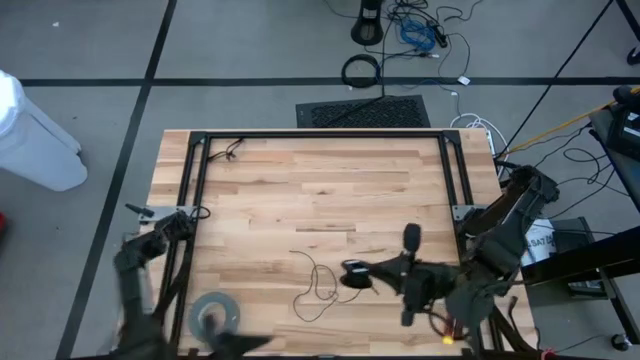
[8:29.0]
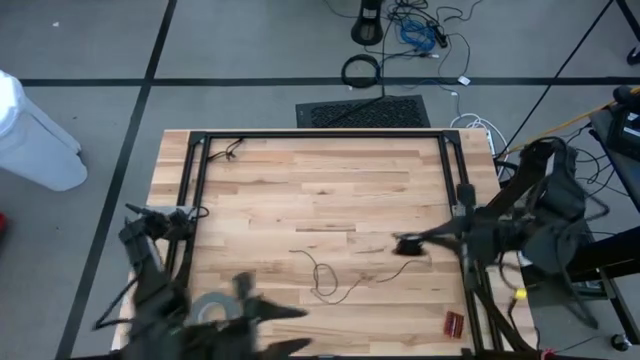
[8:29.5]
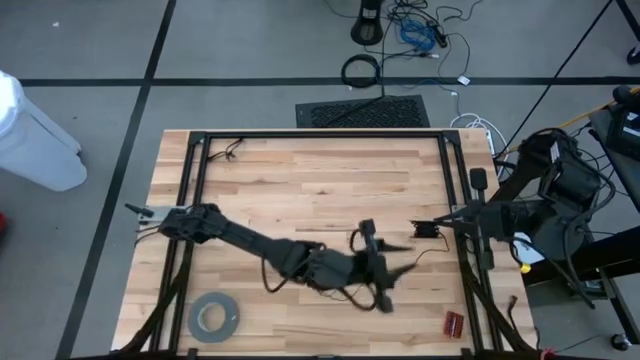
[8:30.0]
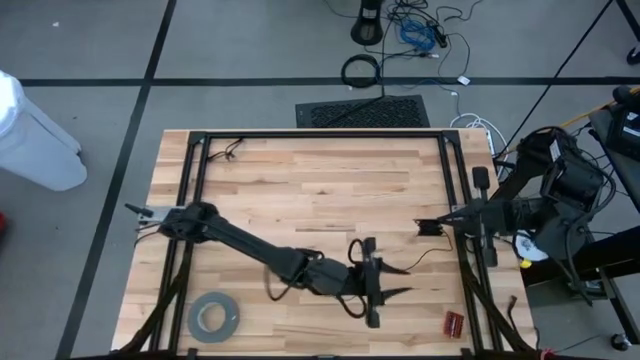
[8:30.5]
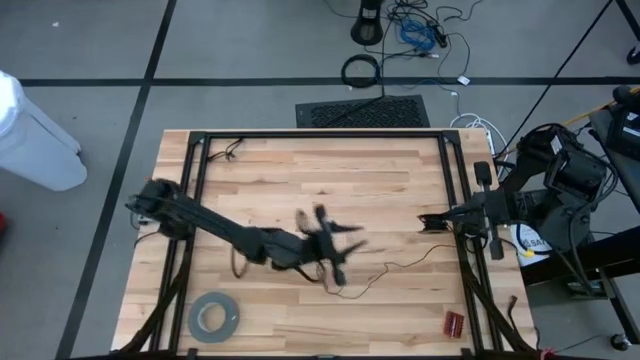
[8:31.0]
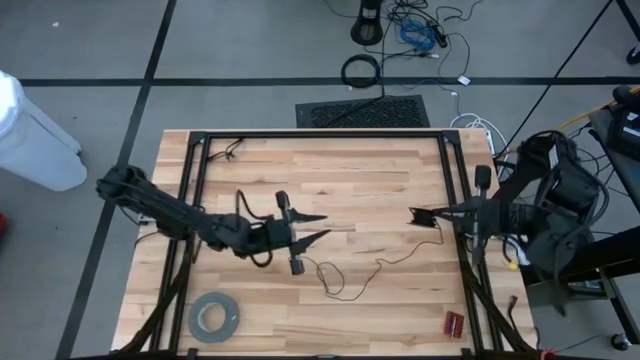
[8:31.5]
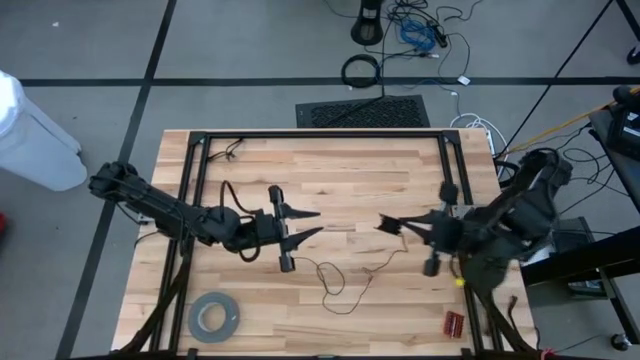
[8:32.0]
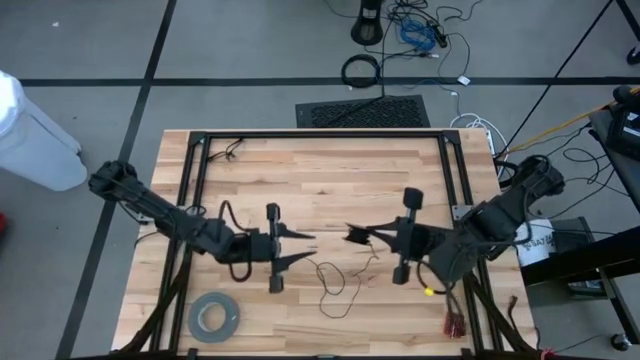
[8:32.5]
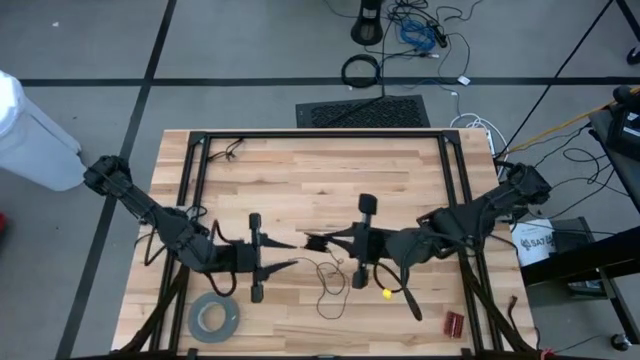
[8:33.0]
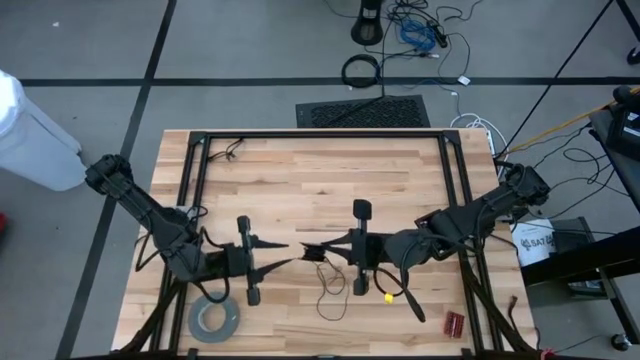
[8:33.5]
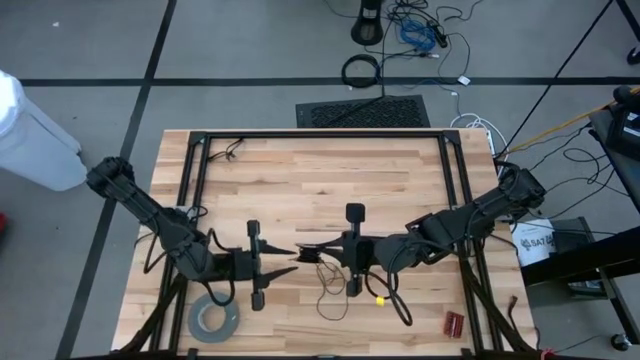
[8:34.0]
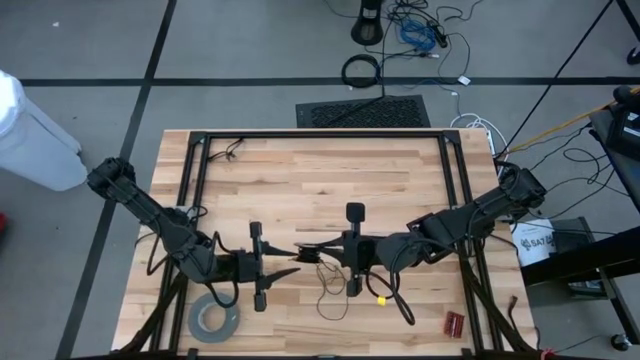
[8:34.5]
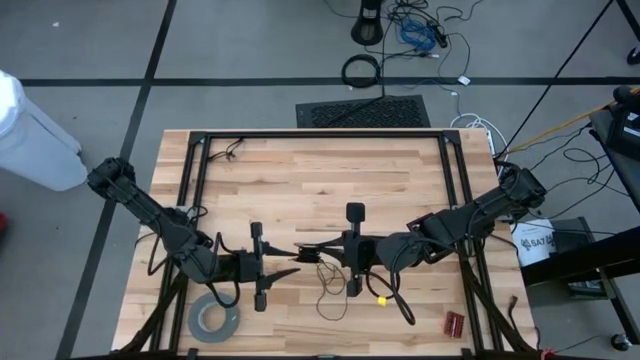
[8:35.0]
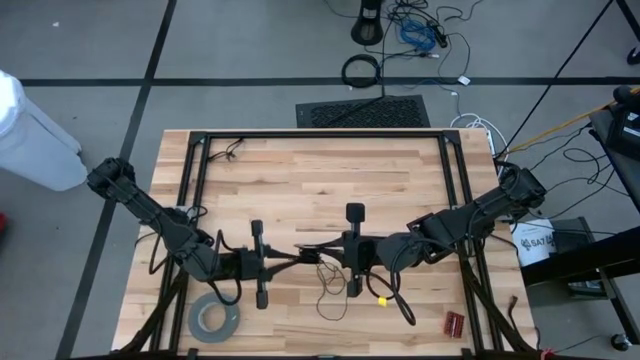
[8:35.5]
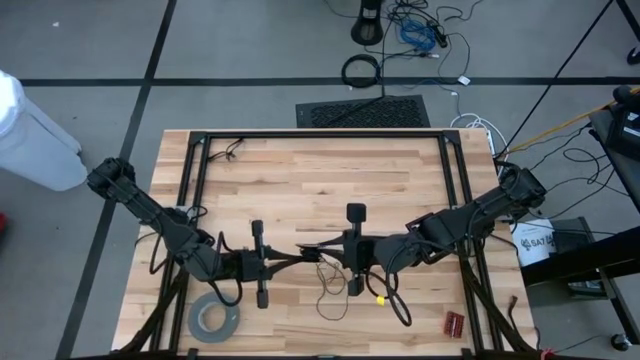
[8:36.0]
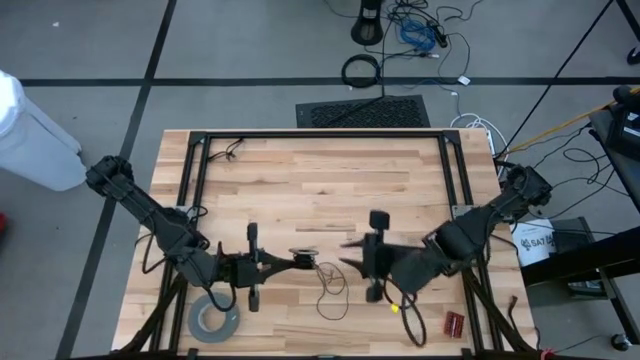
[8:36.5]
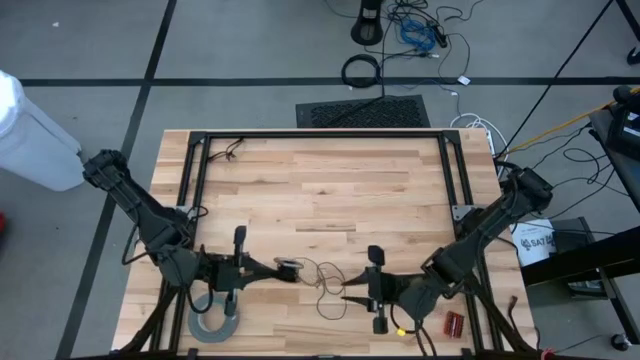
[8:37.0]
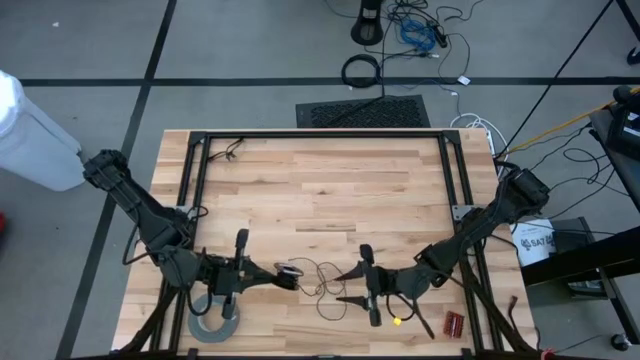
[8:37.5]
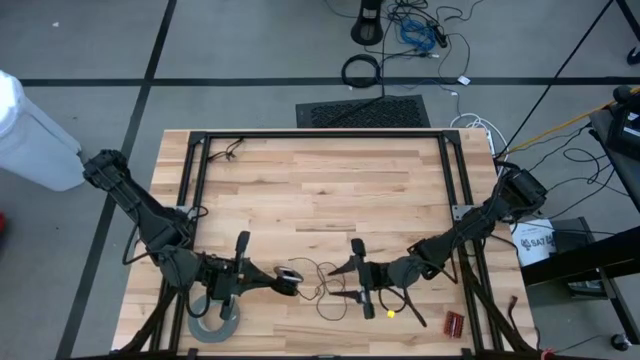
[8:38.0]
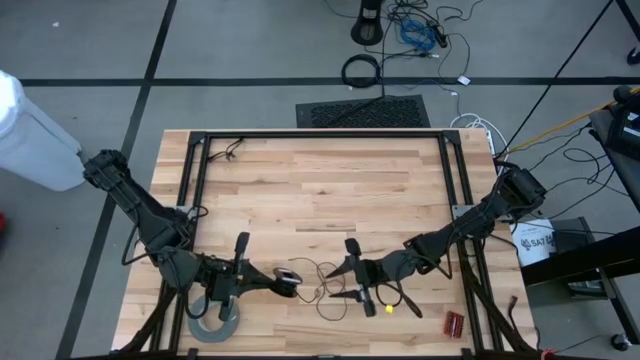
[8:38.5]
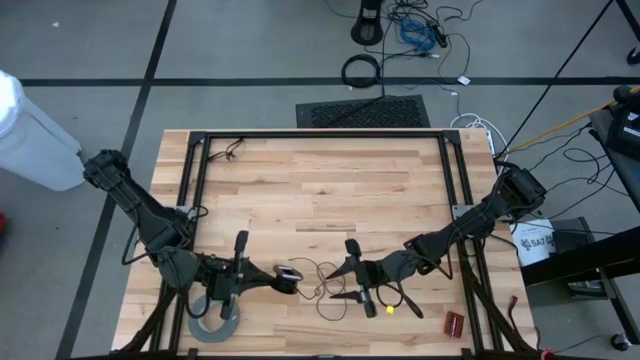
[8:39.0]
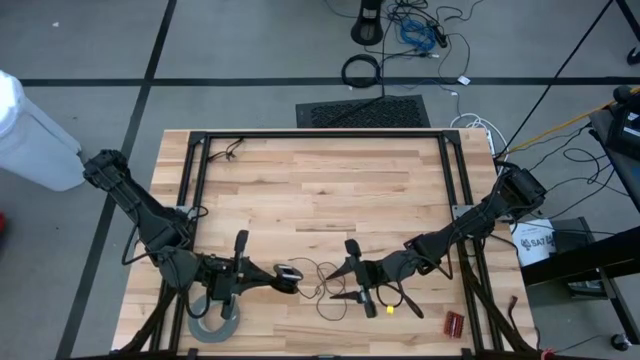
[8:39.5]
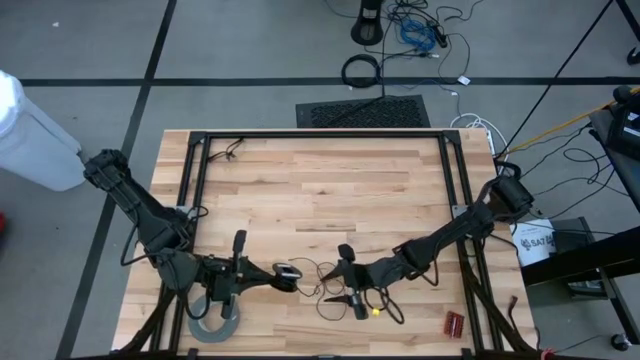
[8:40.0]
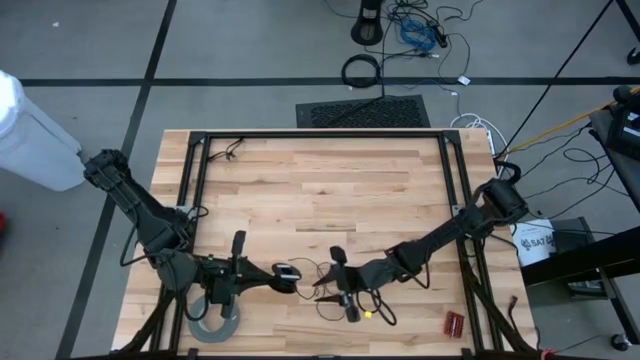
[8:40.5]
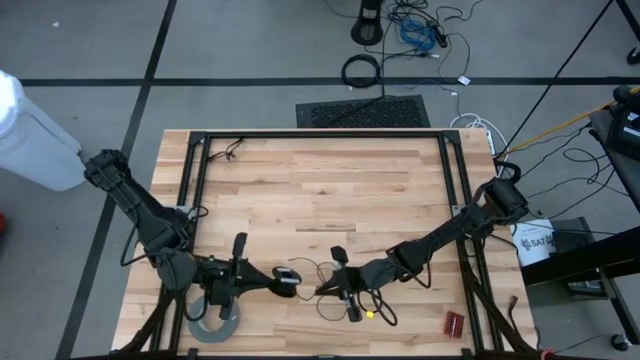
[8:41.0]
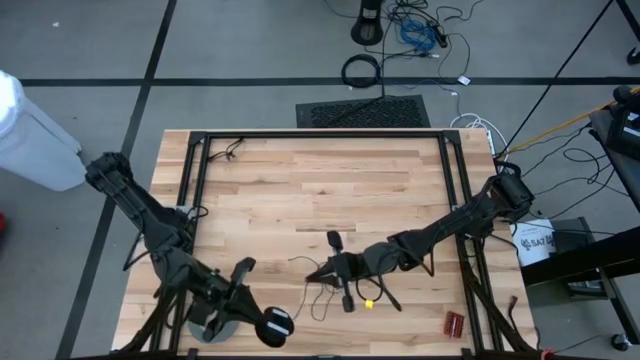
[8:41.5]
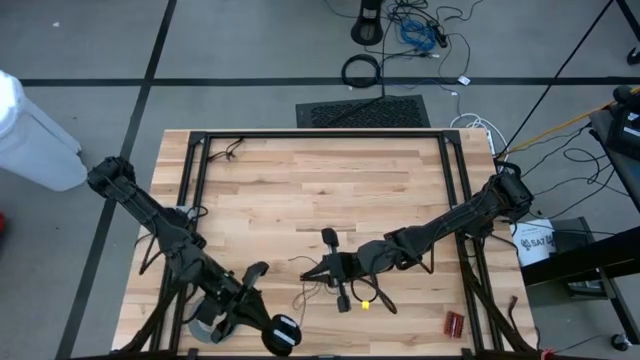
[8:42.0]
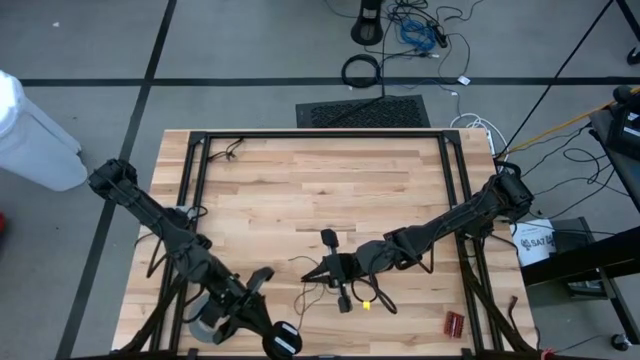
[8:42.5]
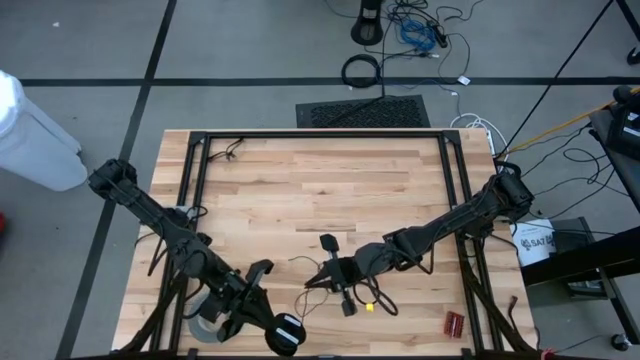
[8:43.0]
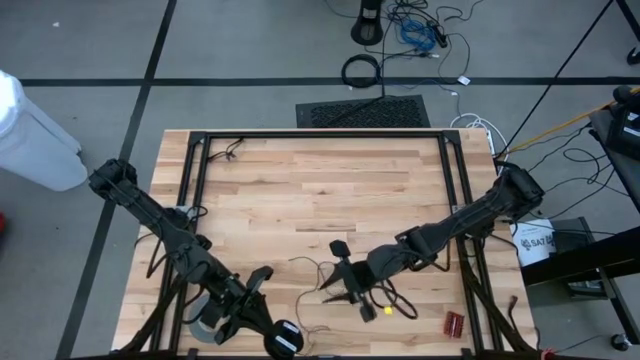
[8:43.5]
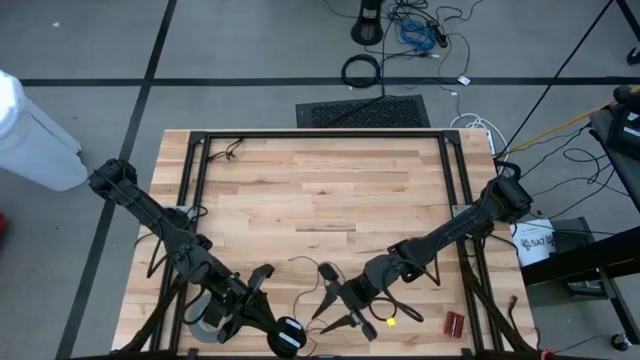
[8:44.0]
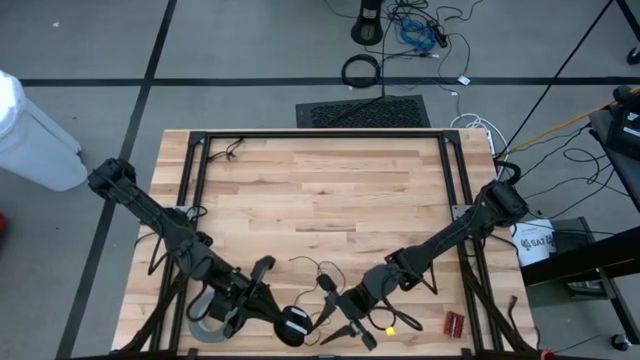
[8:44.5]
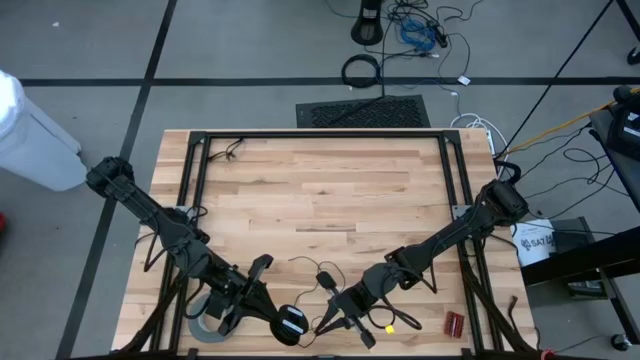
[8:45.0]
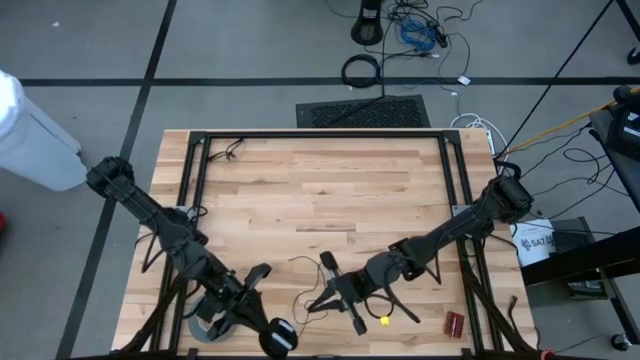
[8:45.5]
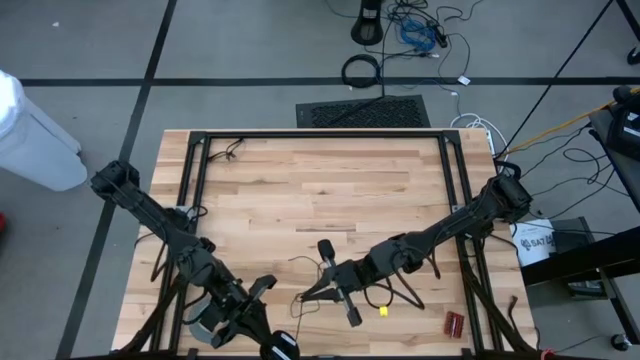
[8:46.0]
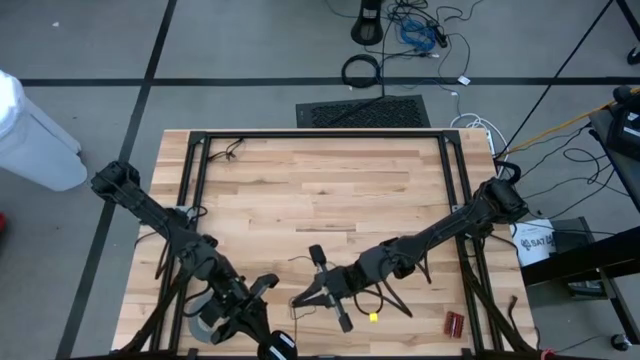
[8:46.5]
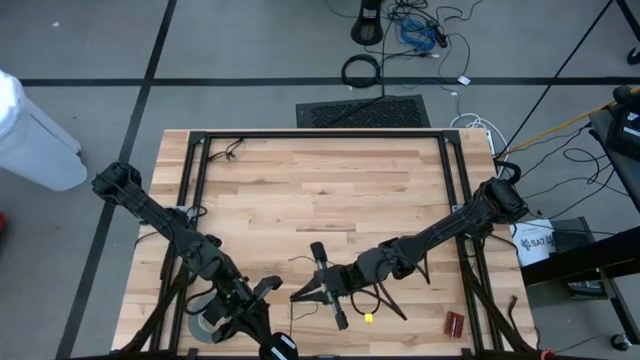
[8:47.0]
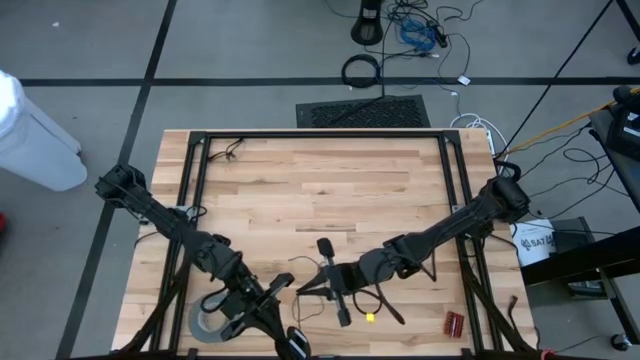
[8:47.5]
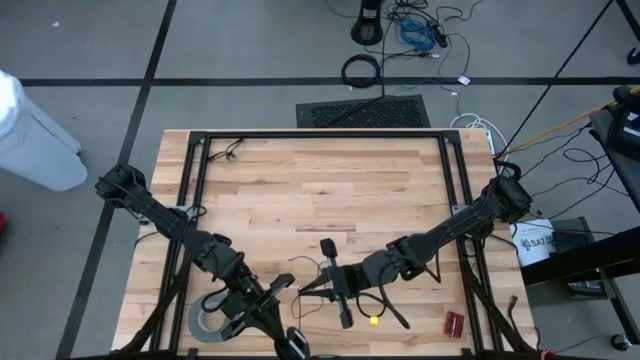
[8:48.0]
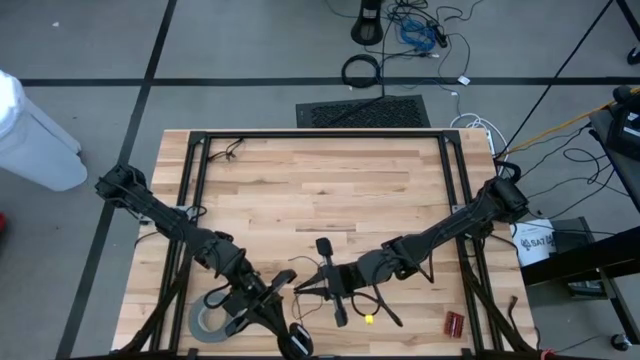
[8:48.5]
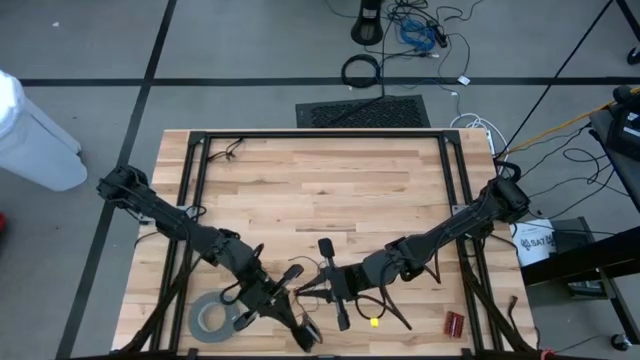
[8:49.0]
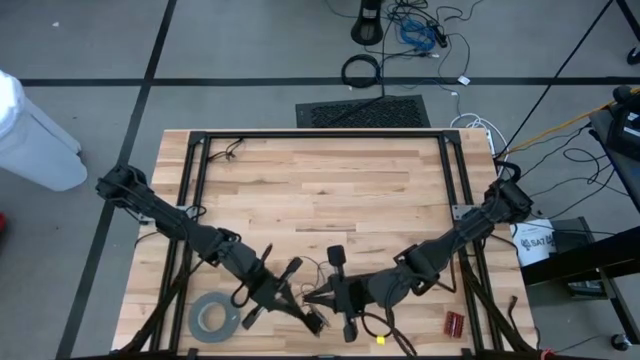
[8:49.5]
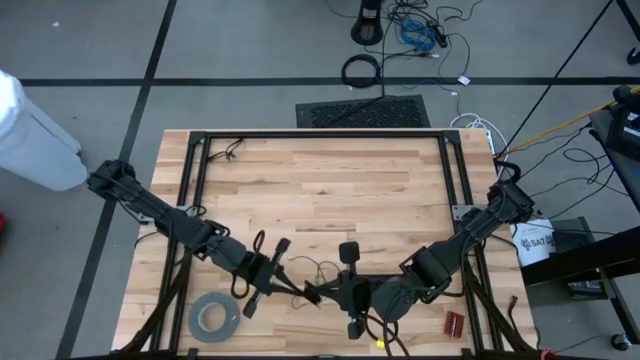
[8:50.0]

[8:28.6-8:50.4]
Task: Coil cords
Coil the black wire onto the spool
